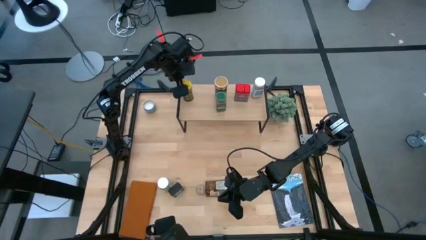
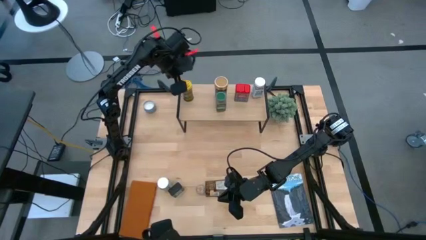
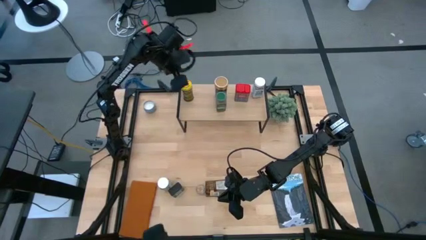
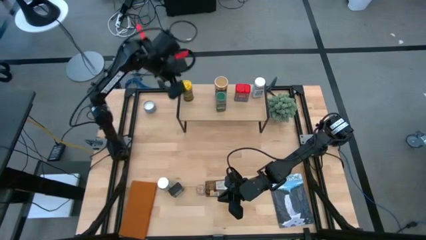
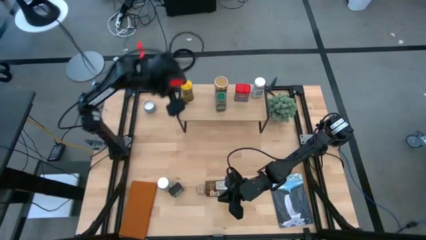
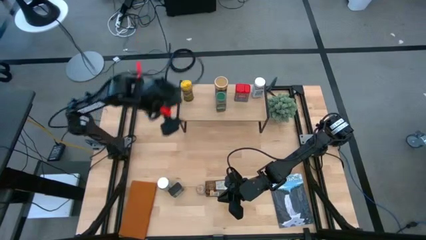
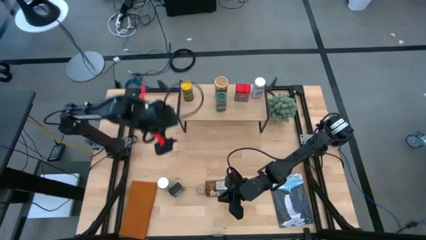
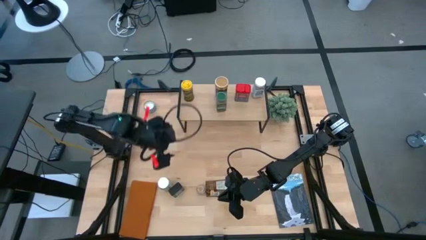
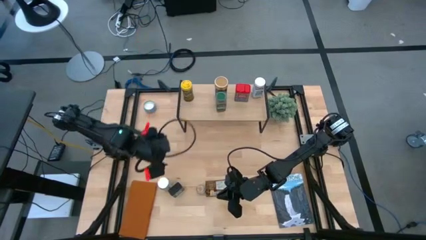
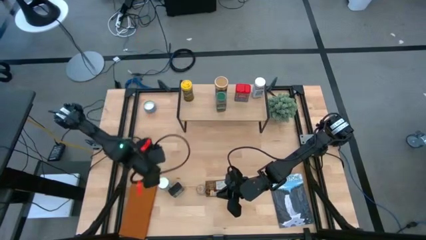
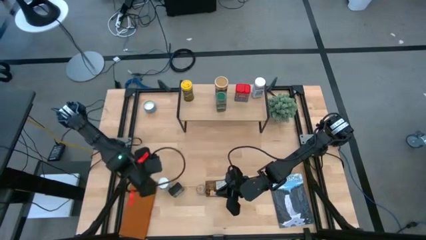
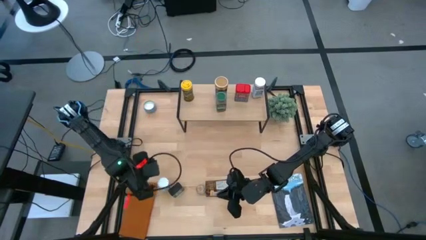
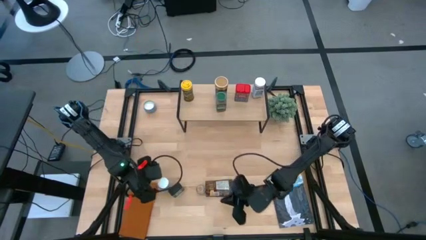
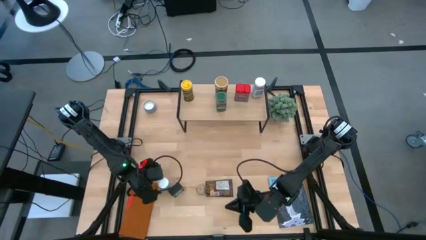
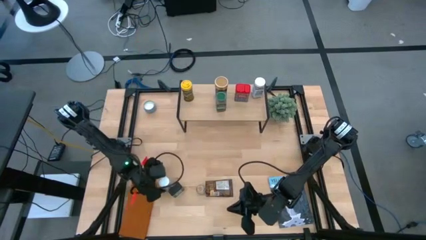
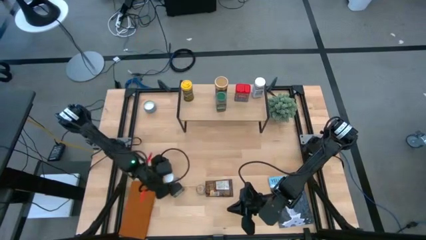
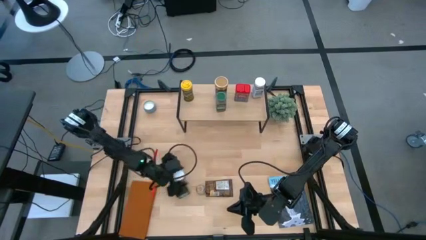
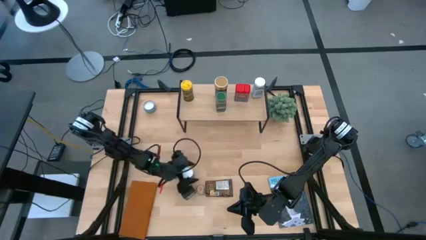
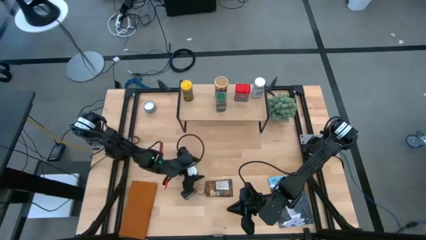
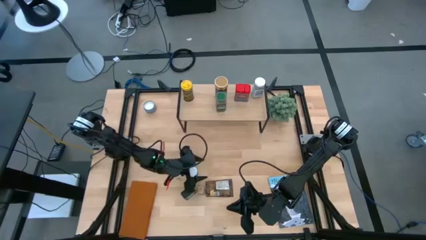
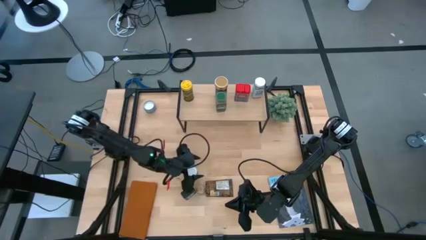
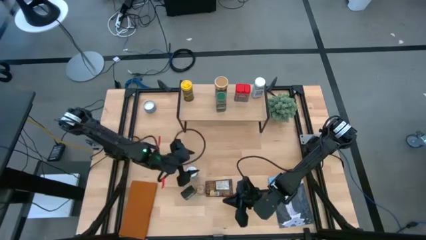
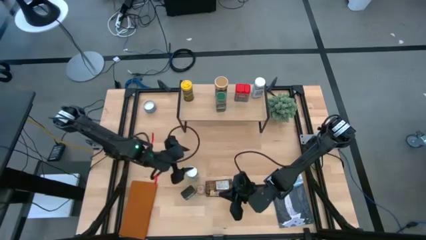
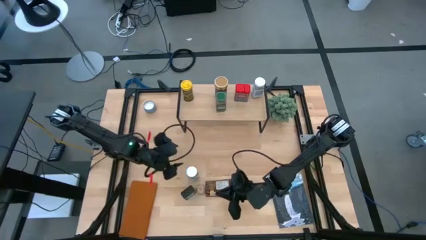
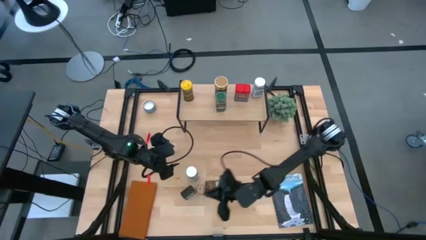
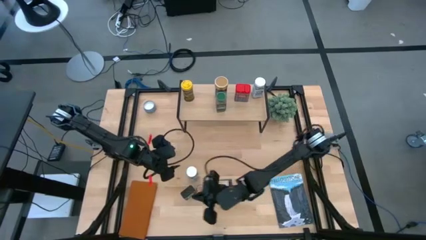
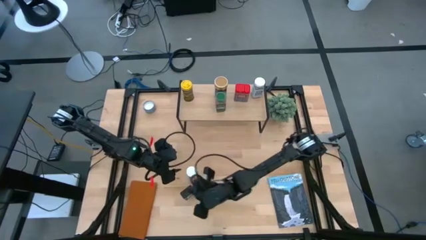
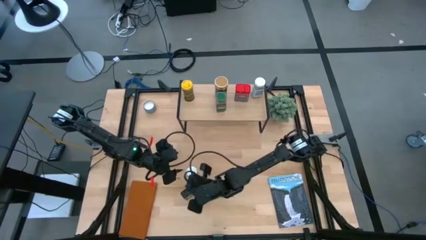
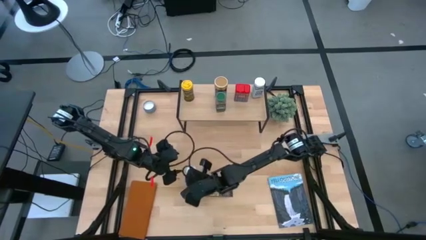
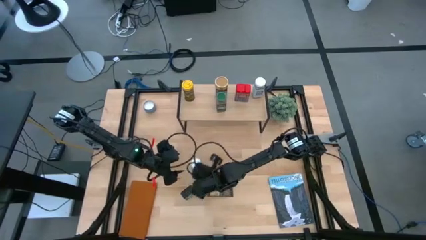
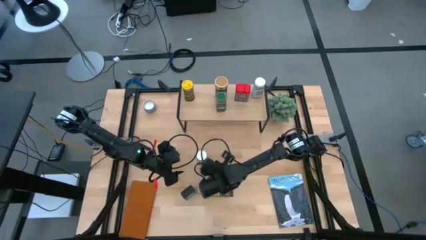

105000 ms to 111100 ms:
Task: Shelf spices
Adjust the white seasoning bottle

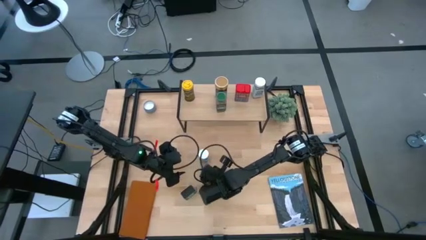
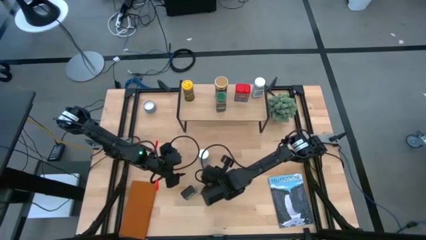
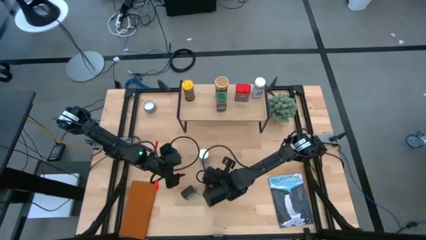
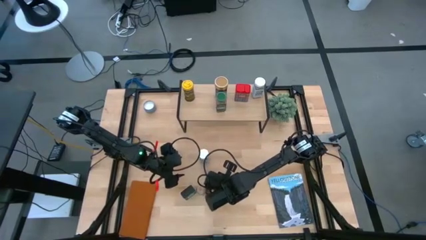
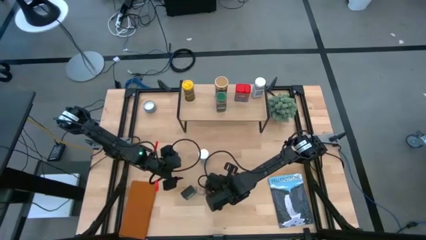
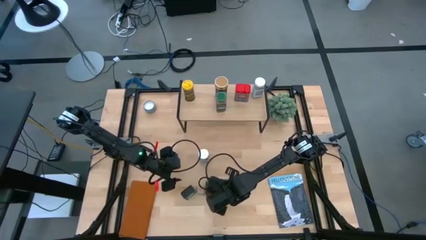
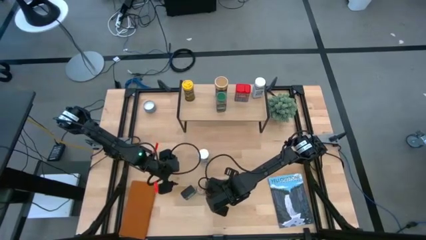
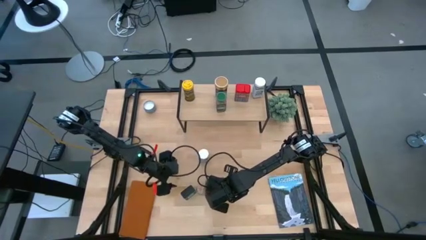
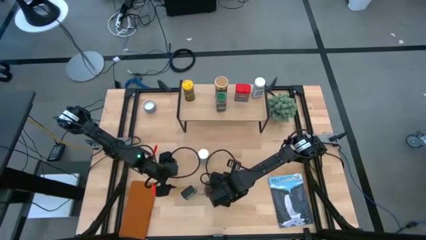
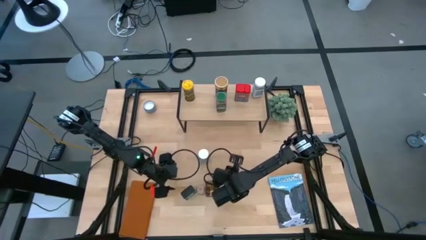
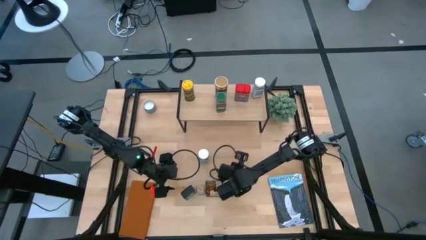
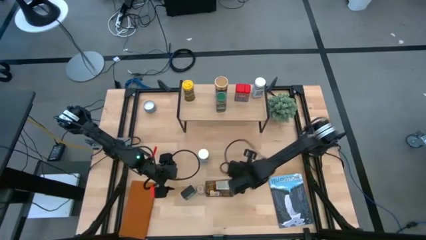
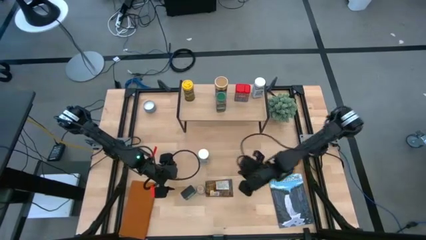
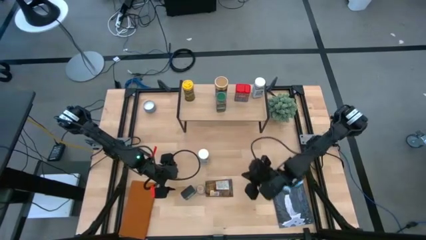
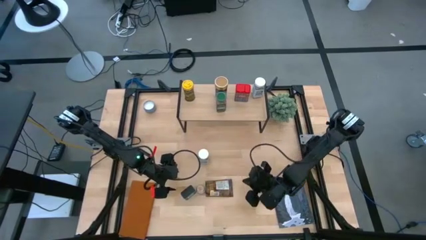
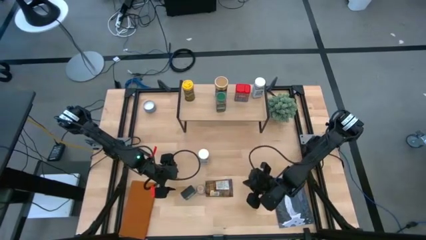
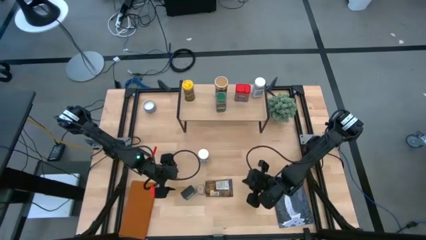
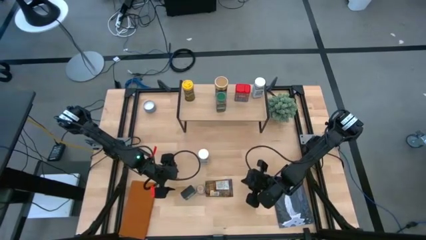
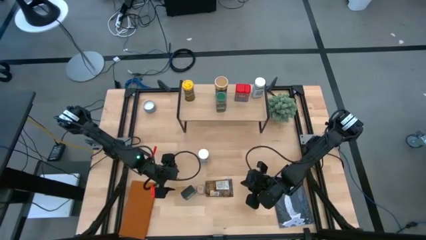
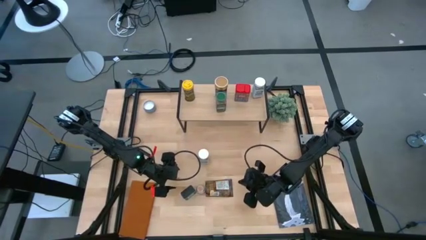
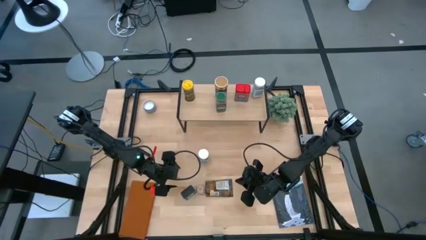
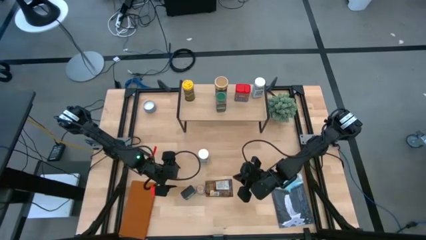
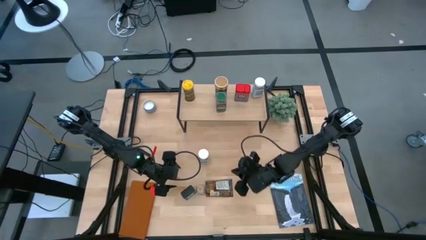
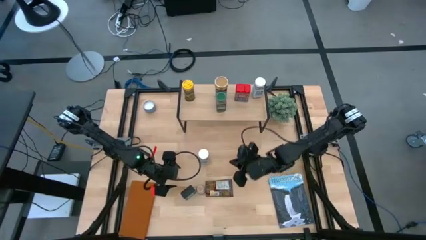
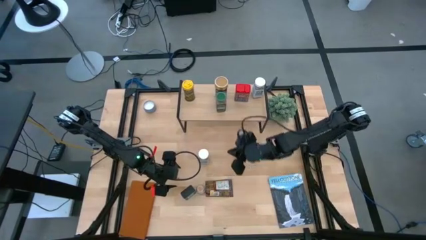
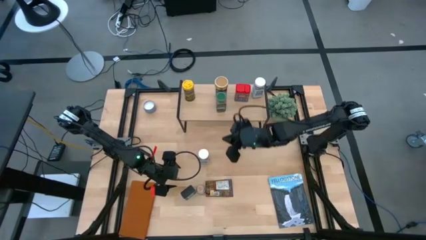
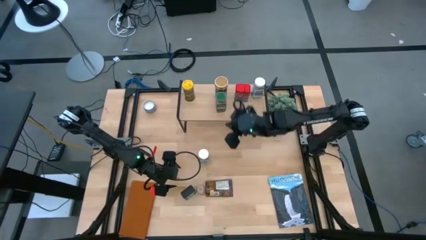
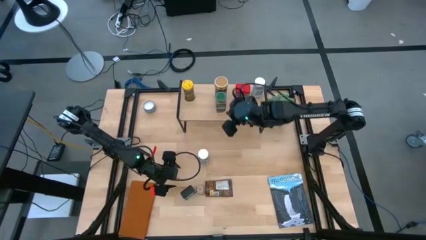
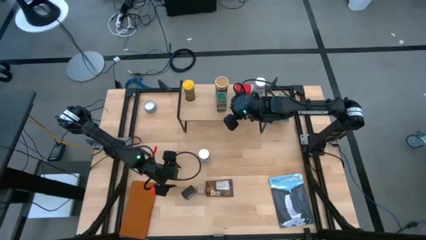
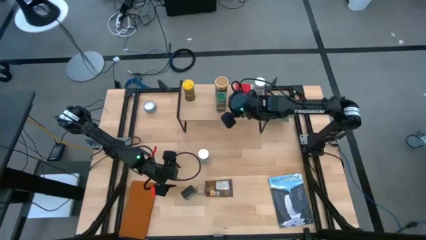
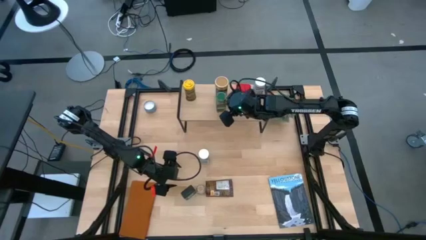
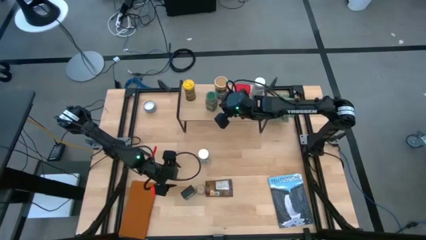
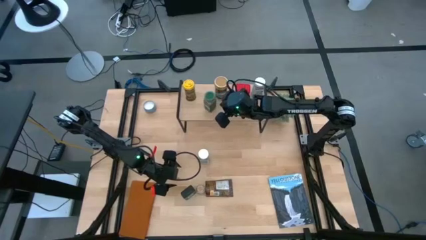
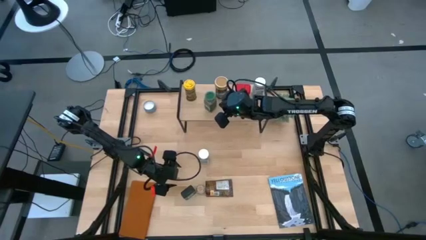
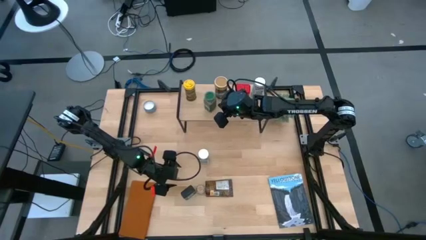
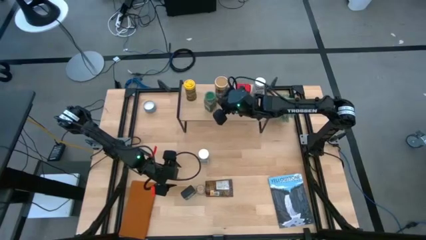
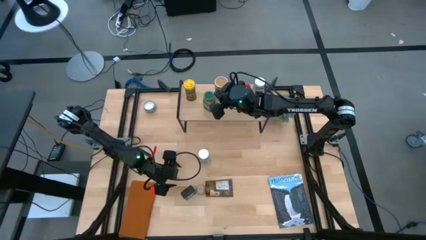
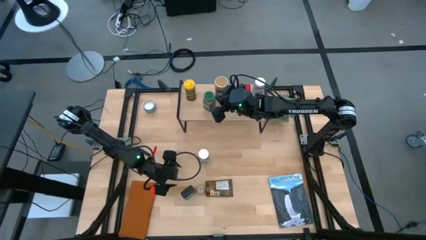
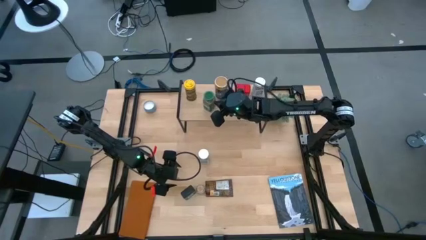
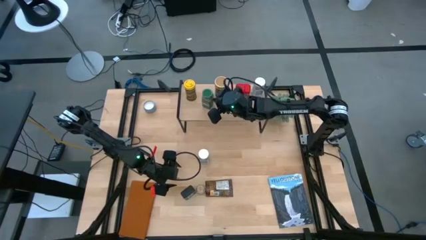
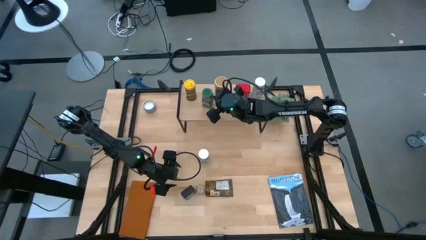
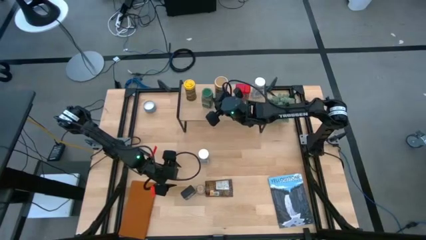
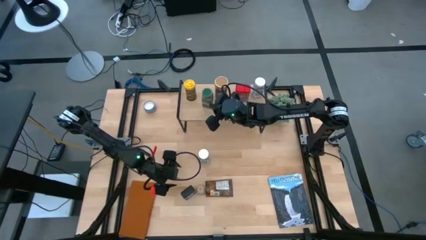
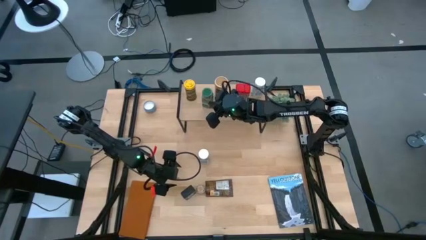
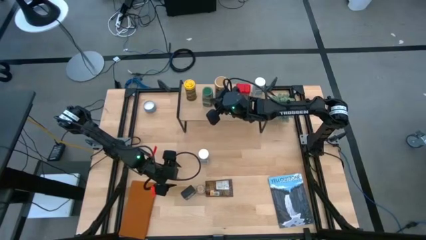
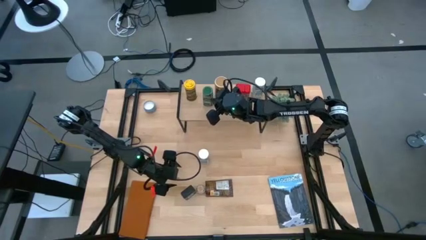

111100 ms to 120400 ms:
Adjust the green seasoning bottle on the shelf
